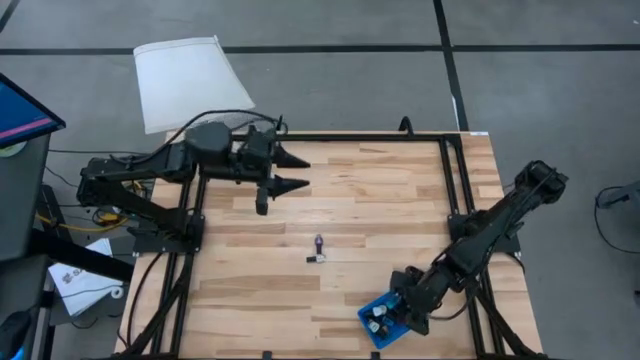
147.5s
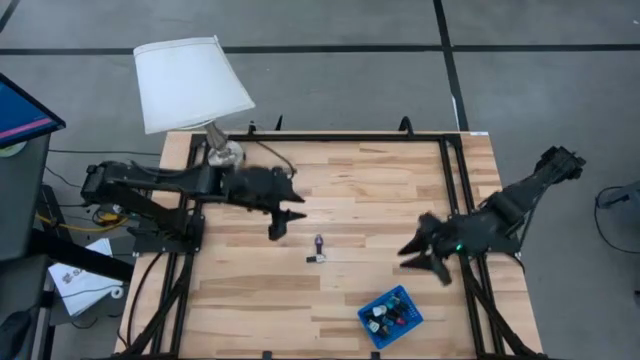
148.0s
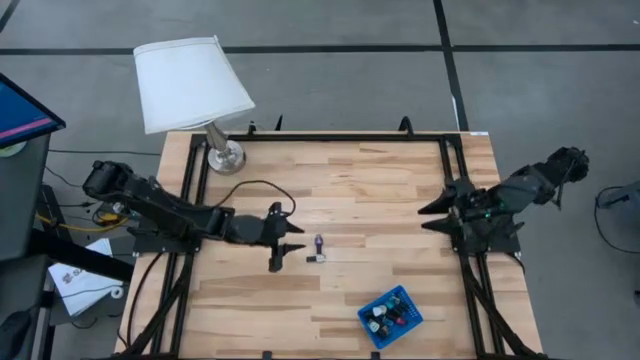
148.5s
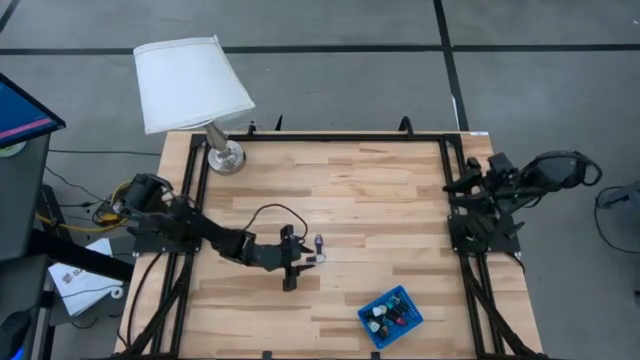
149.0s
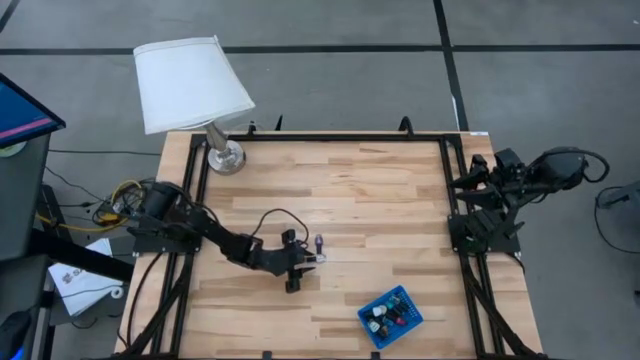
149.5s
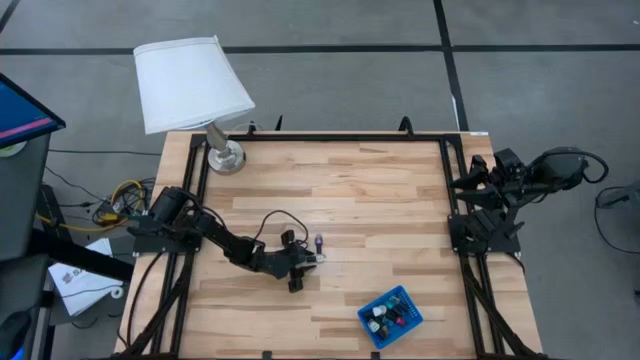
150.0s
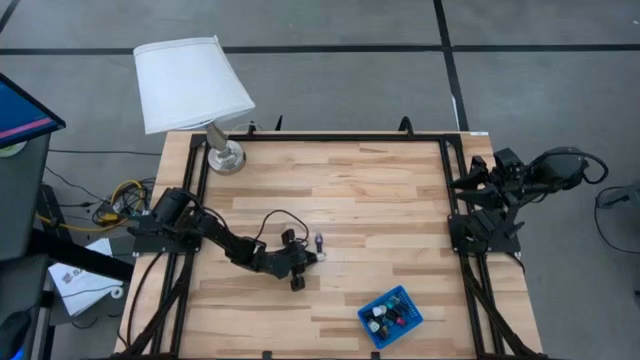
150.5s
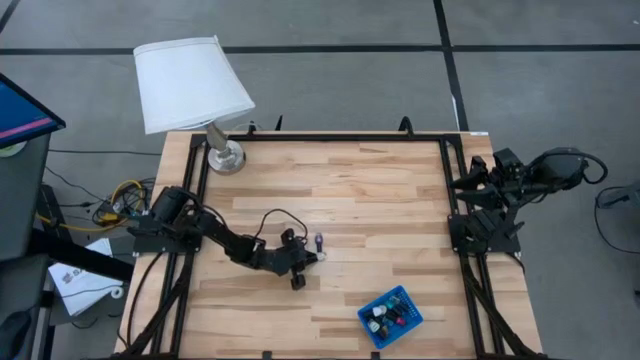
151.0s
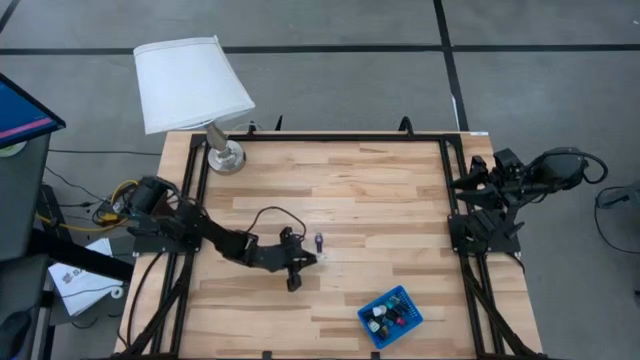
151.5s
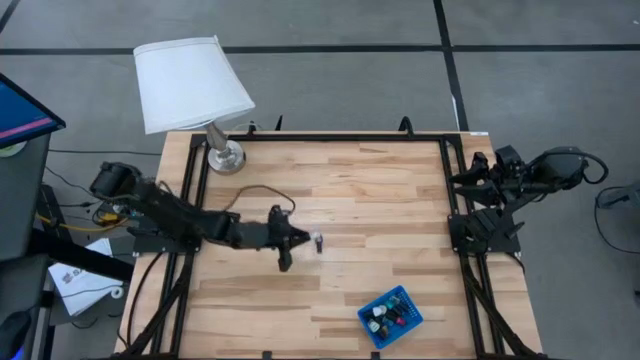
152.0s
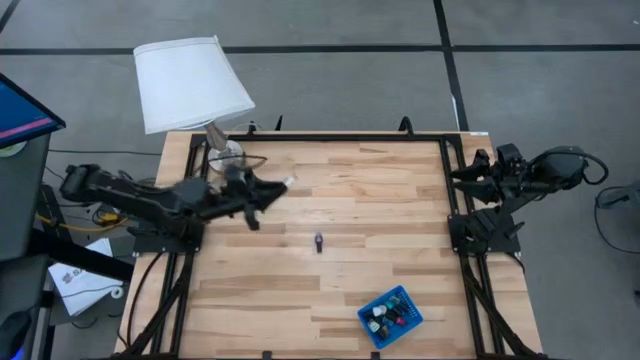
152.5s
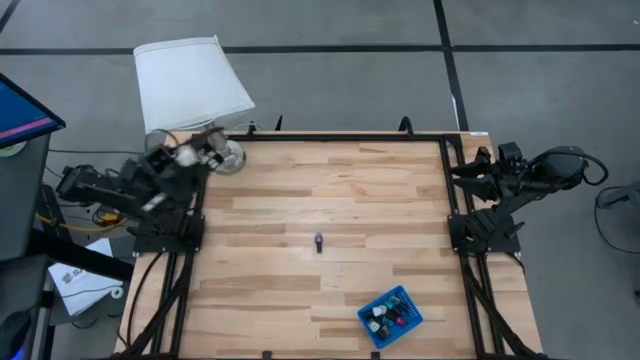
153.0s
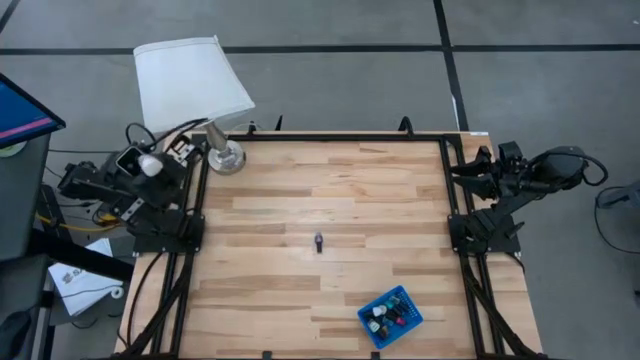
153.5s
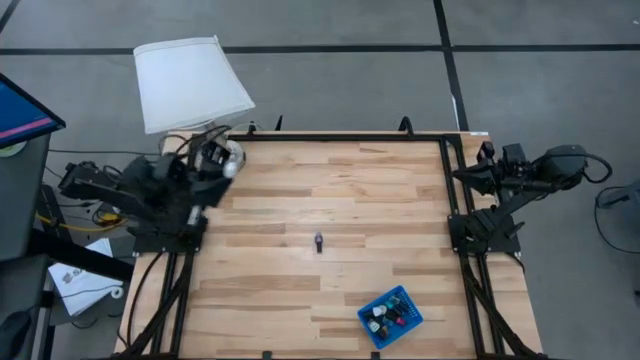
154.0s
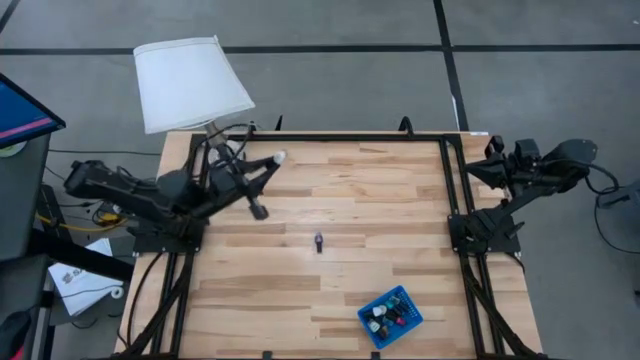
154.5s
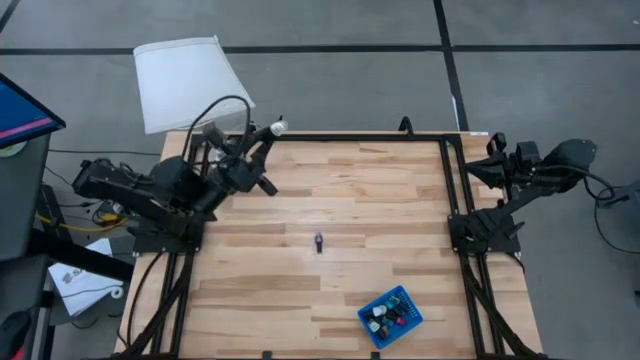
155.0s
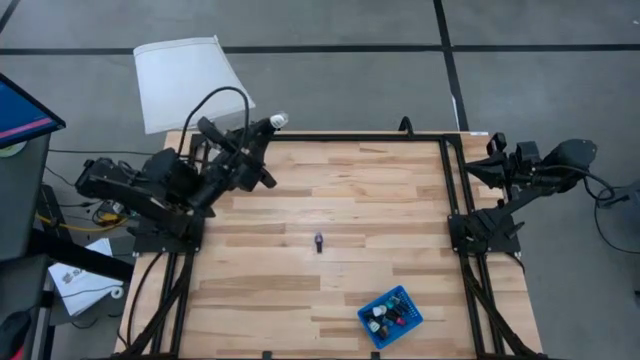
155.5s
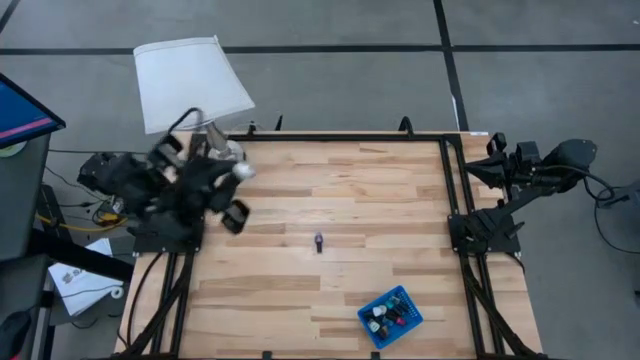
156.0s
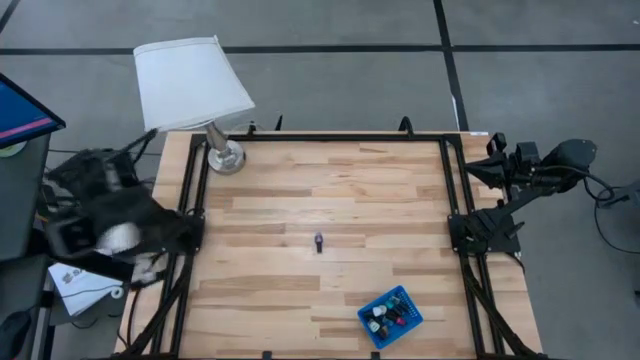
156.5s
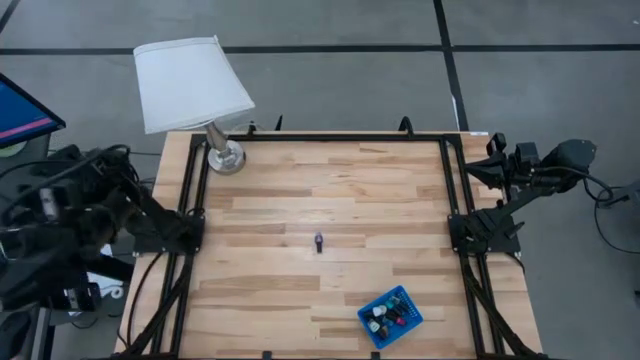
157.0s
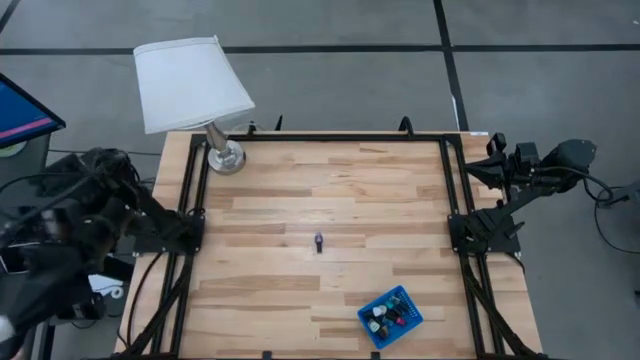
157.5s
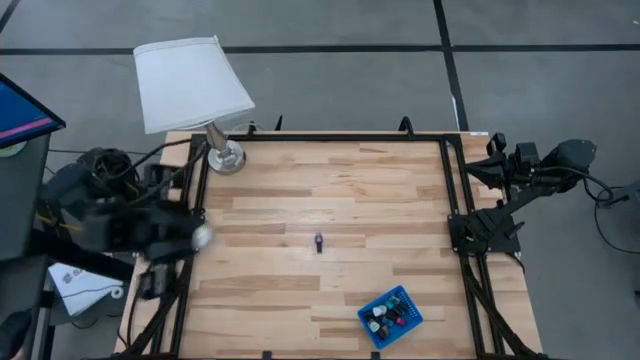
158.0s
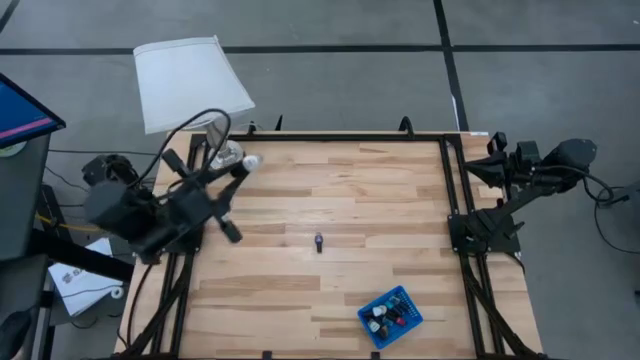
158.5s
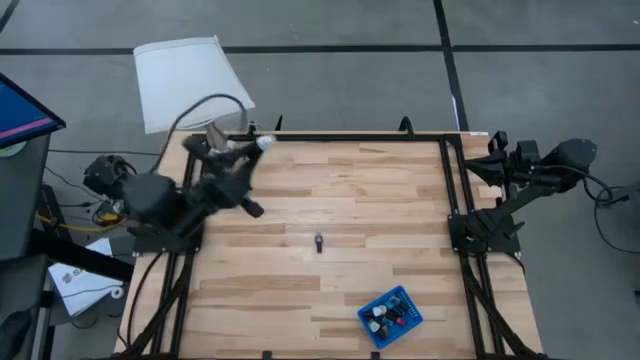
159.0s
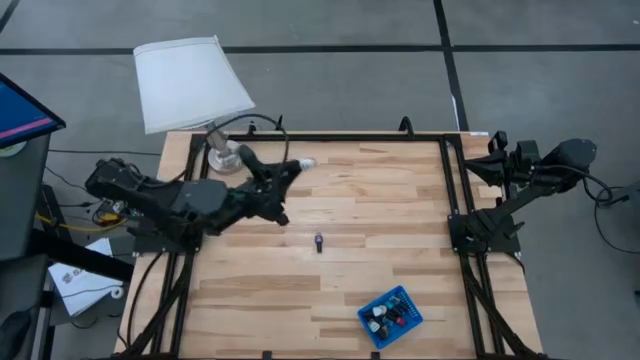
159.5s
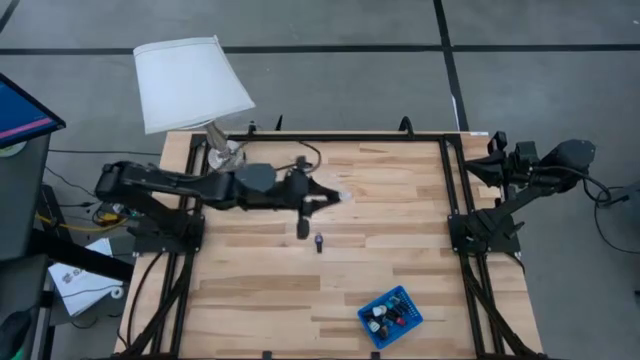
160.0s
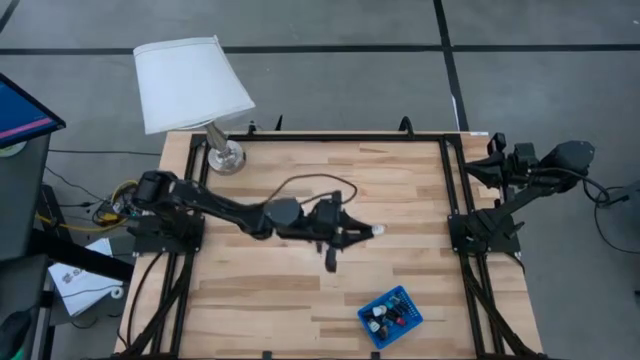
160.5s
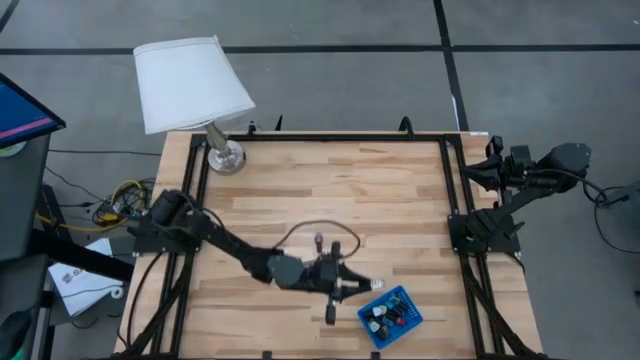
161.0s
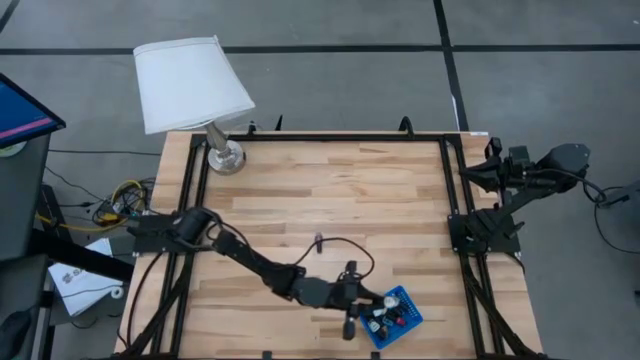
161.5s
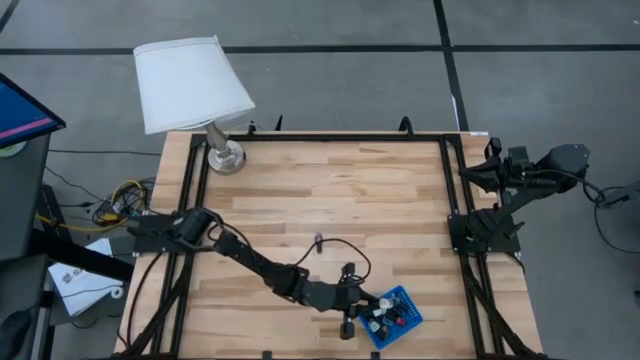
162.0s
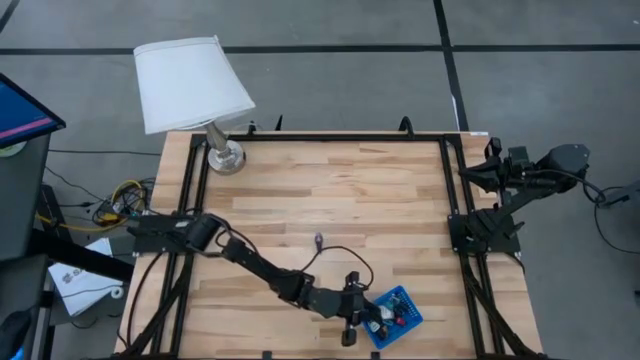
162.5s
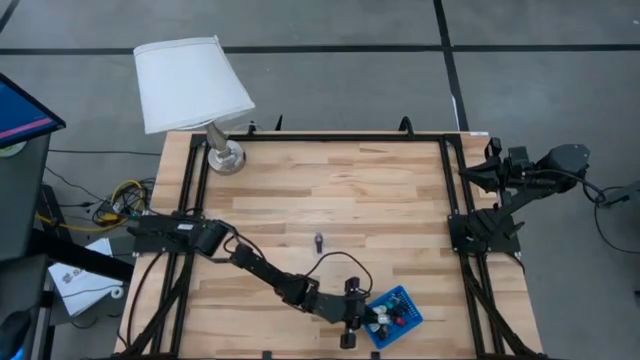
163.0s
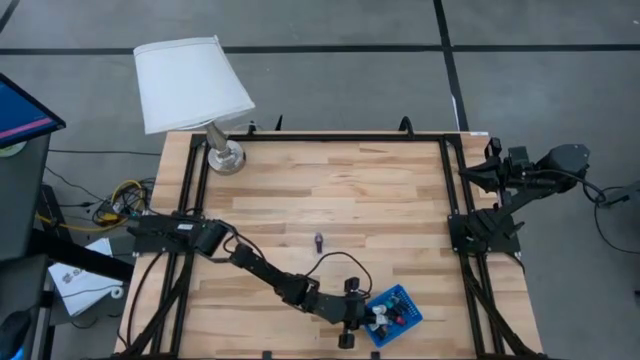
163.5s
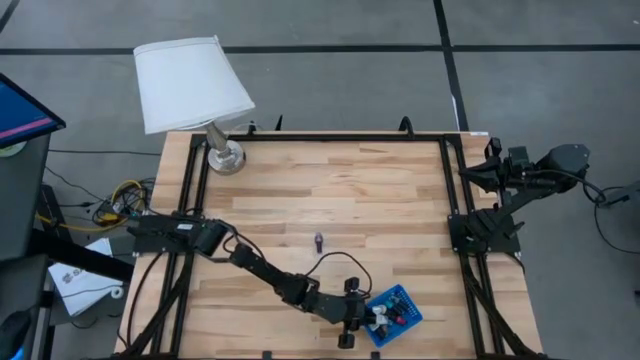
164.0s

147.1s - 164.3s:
Task: Pick & Place Nail Polish
Put the white nail polish into the blue bin

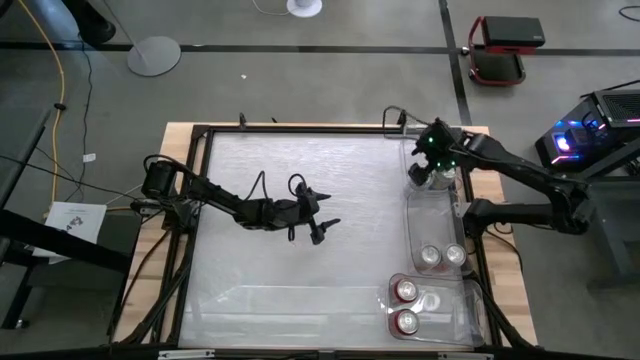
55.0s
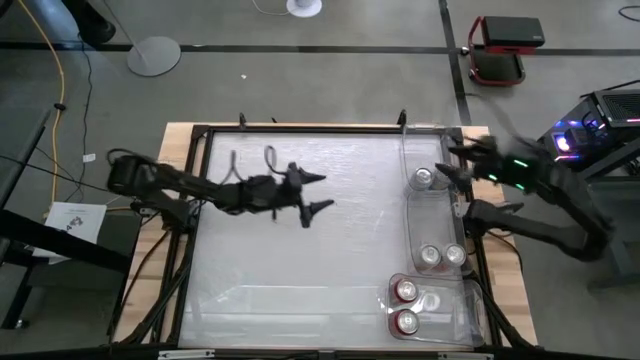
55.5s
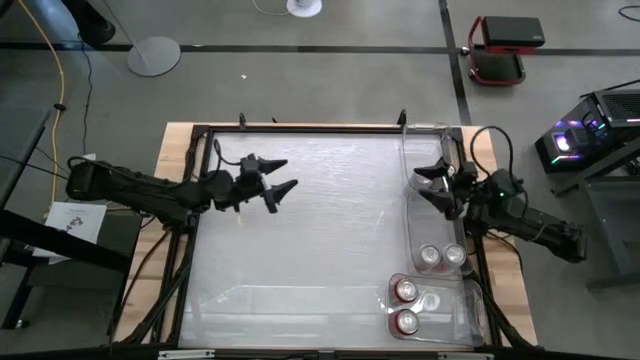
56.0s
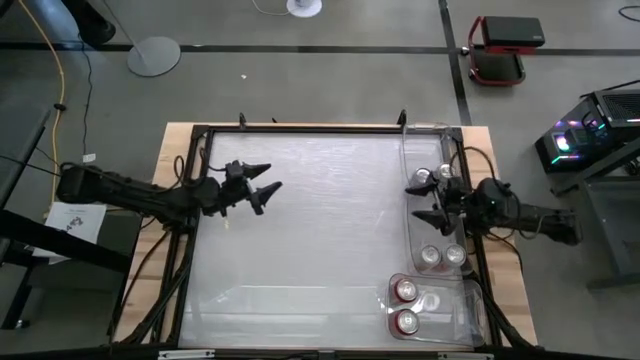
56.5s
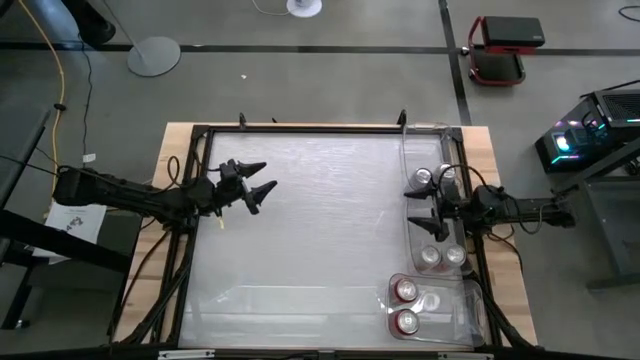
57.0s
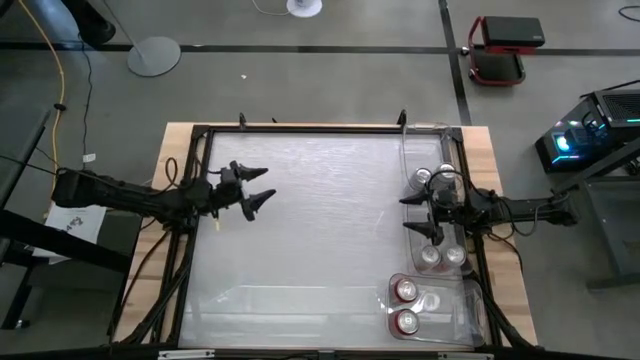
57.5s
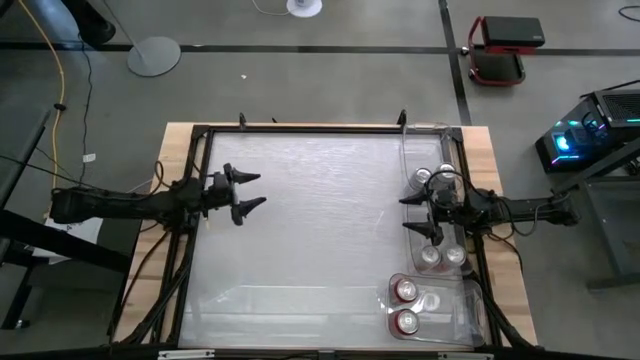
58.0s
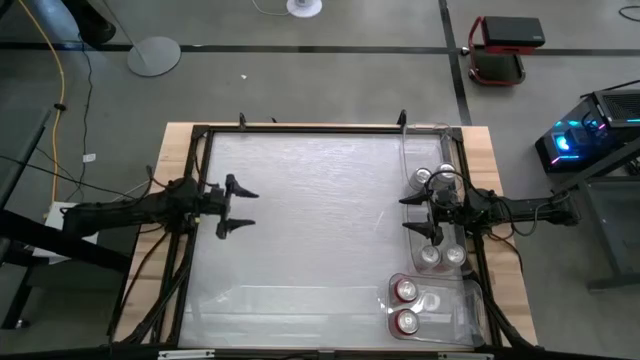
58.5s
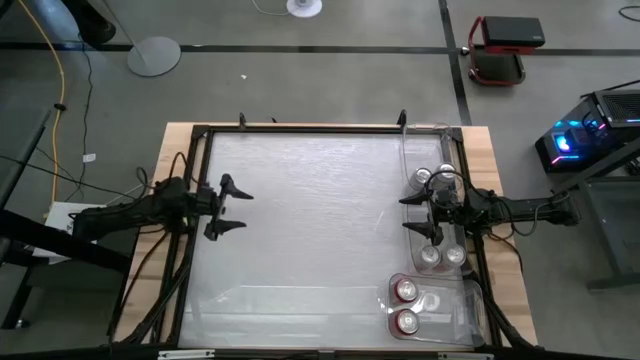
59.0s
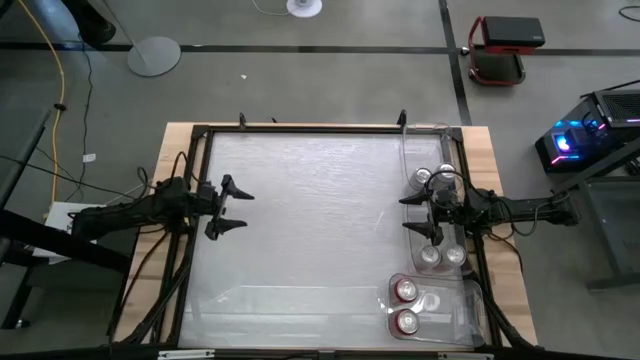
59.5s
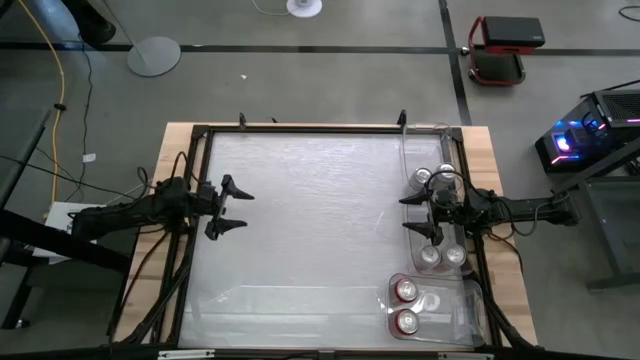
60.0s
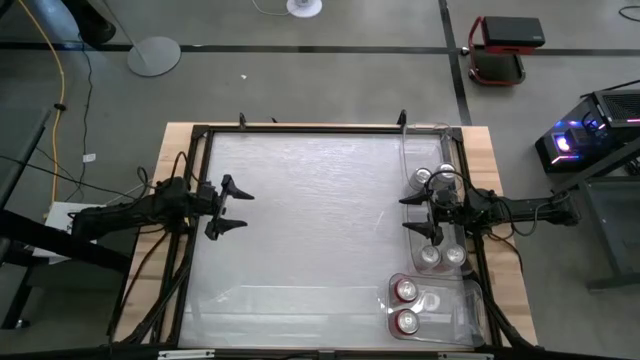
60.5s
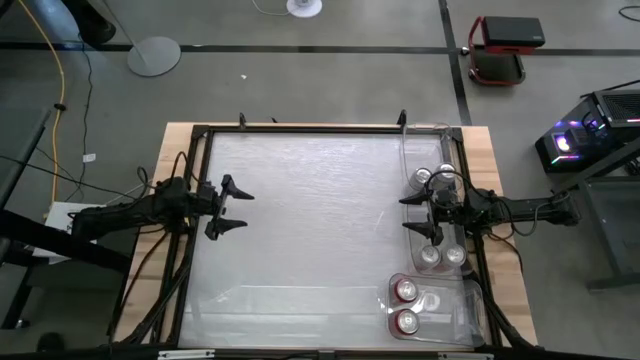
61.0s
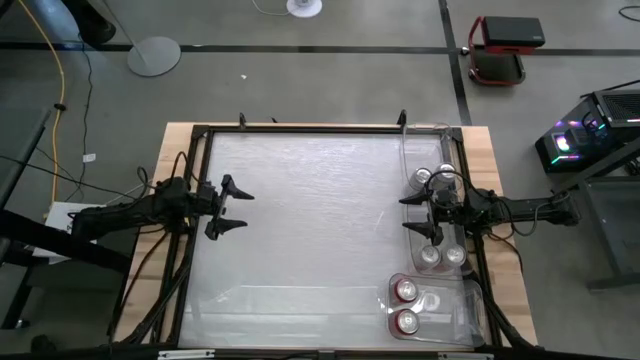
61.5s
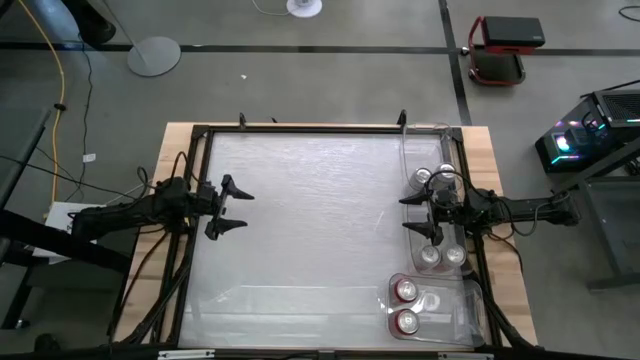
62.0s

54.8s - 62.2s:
Task: Sort soda cans
Return to Home Position
